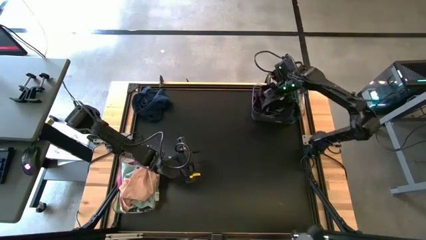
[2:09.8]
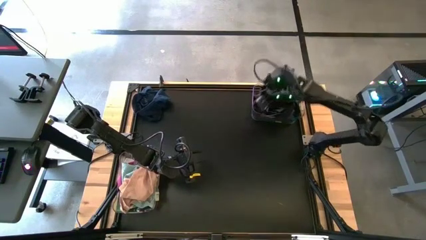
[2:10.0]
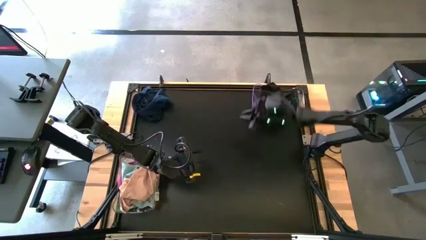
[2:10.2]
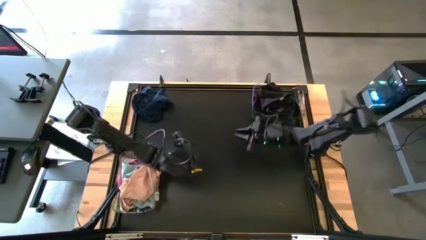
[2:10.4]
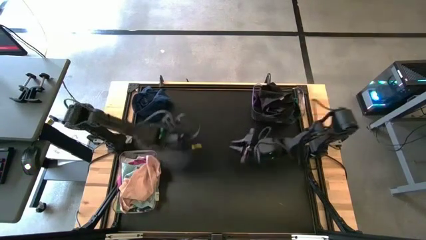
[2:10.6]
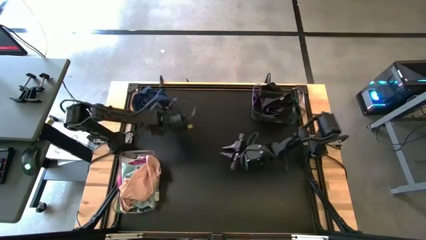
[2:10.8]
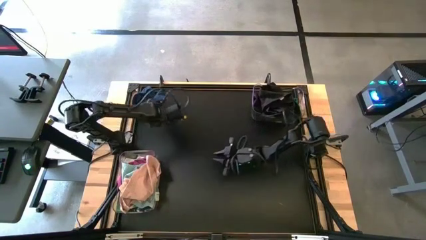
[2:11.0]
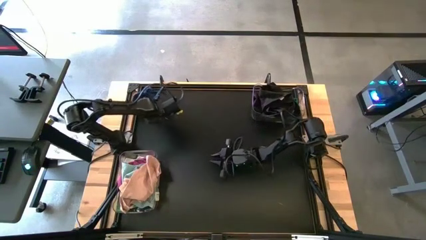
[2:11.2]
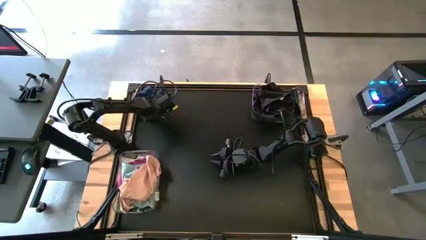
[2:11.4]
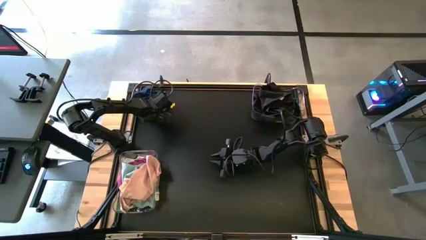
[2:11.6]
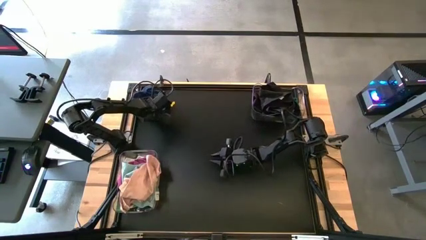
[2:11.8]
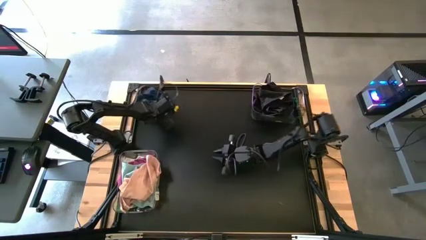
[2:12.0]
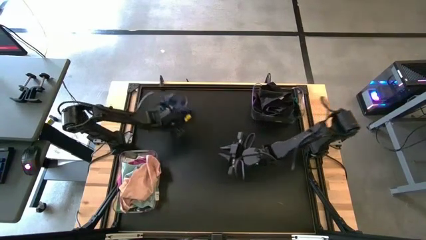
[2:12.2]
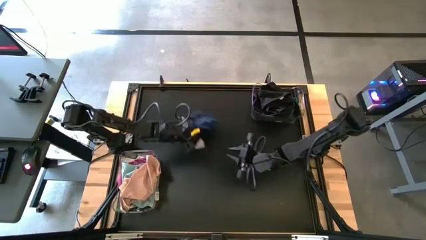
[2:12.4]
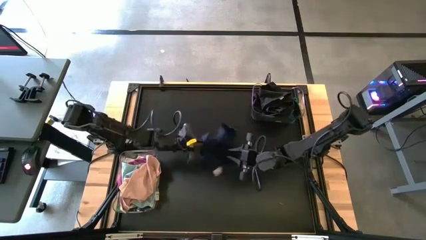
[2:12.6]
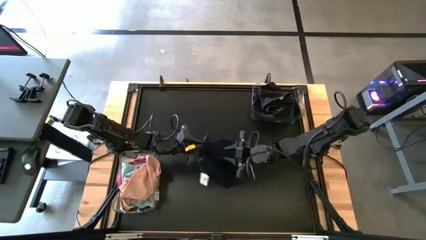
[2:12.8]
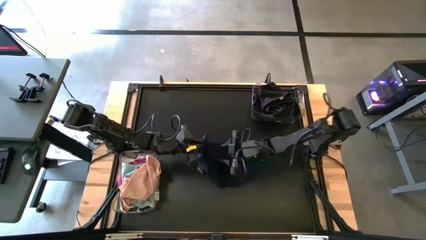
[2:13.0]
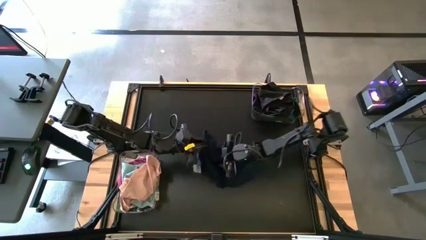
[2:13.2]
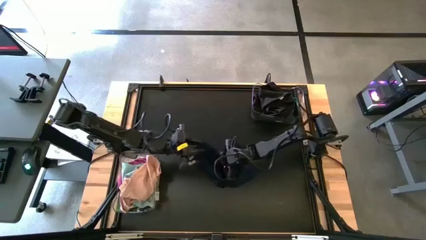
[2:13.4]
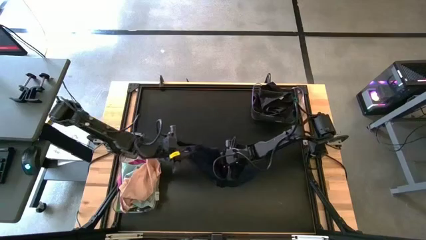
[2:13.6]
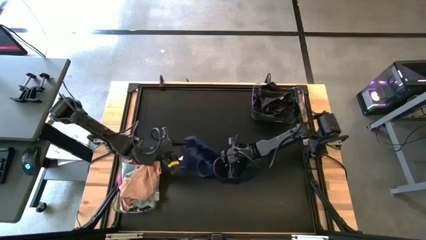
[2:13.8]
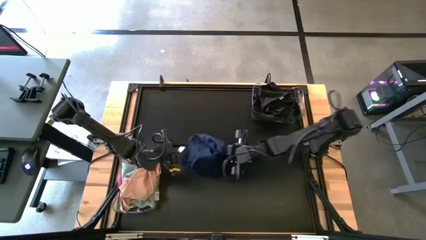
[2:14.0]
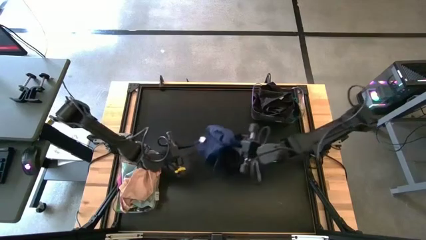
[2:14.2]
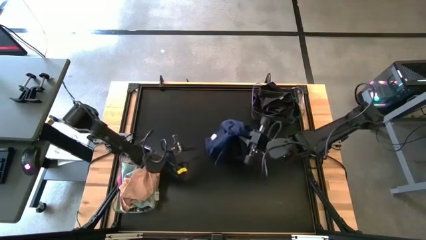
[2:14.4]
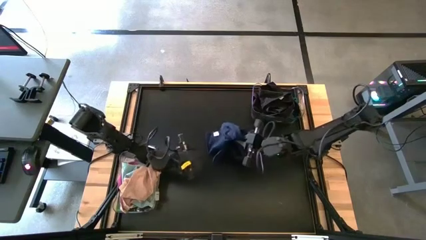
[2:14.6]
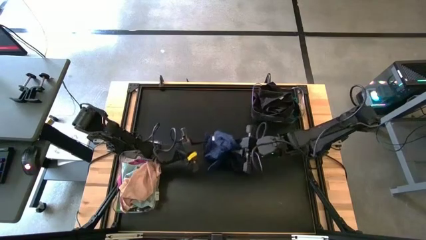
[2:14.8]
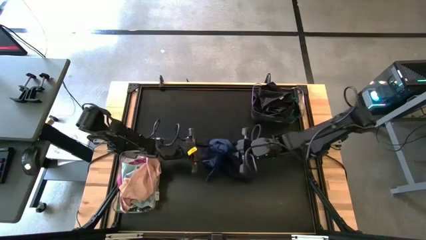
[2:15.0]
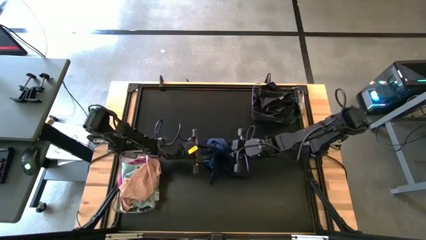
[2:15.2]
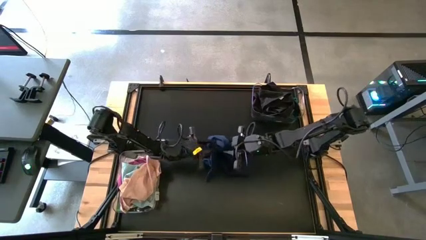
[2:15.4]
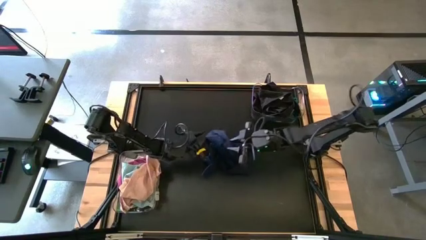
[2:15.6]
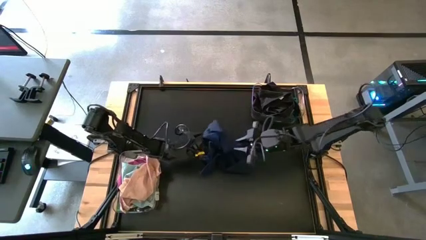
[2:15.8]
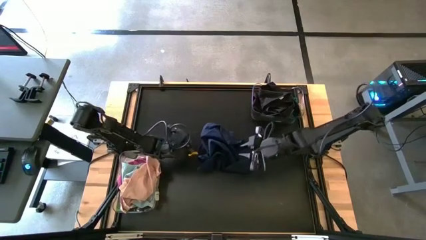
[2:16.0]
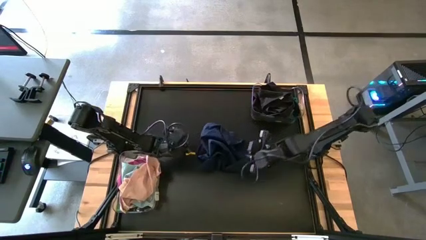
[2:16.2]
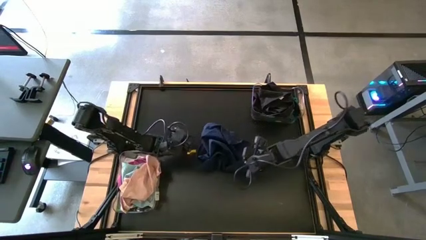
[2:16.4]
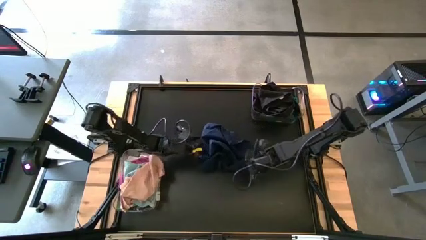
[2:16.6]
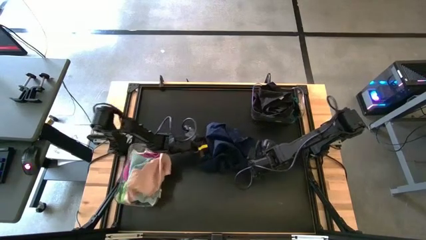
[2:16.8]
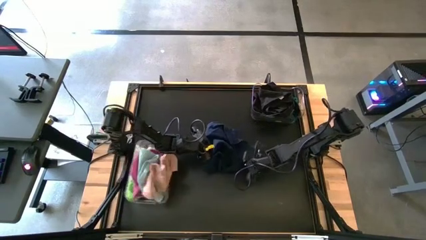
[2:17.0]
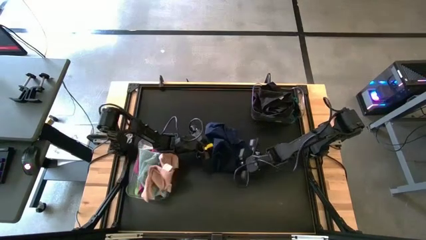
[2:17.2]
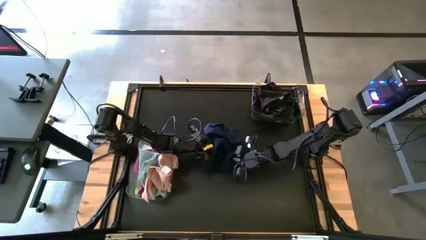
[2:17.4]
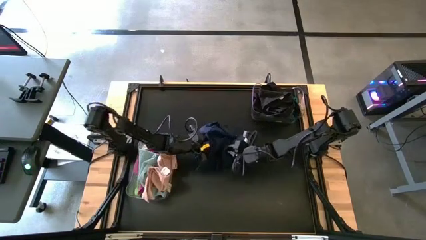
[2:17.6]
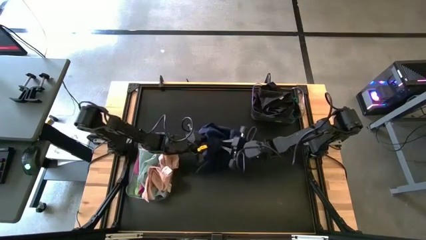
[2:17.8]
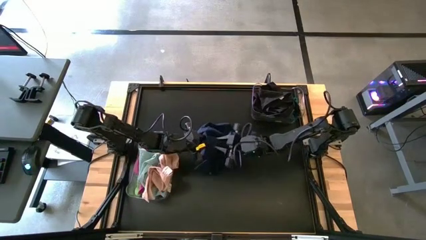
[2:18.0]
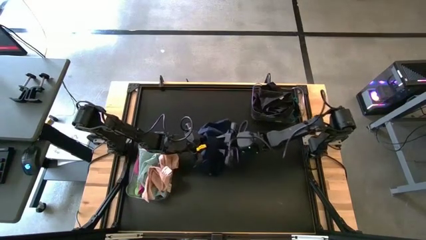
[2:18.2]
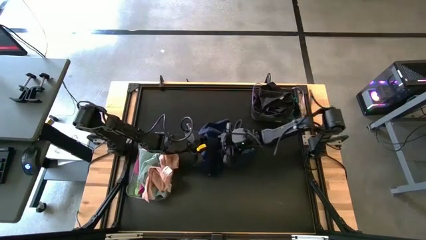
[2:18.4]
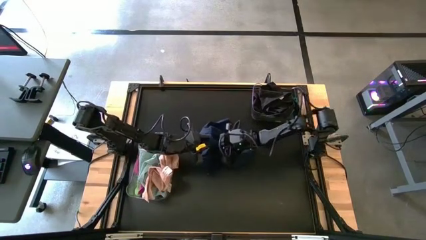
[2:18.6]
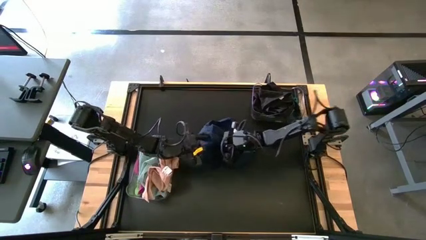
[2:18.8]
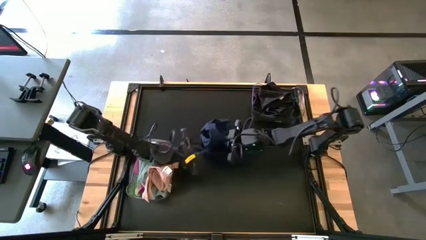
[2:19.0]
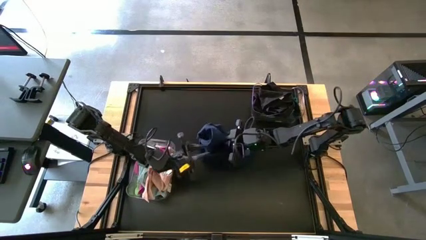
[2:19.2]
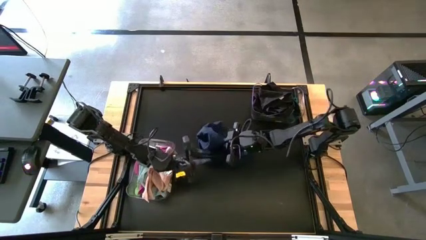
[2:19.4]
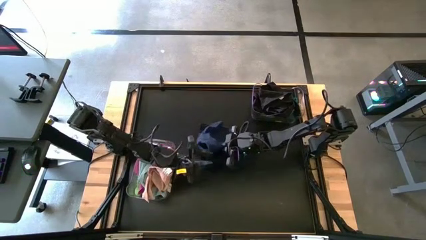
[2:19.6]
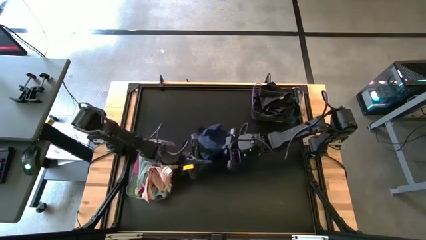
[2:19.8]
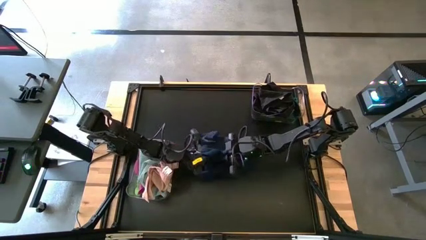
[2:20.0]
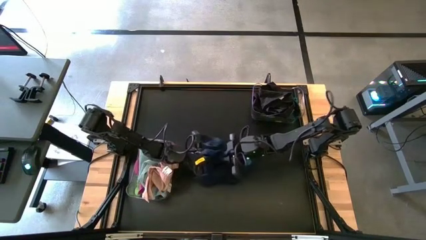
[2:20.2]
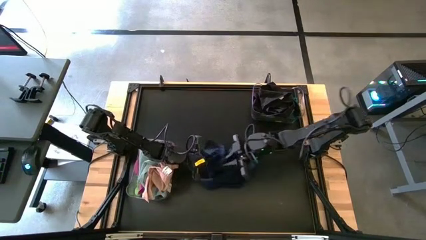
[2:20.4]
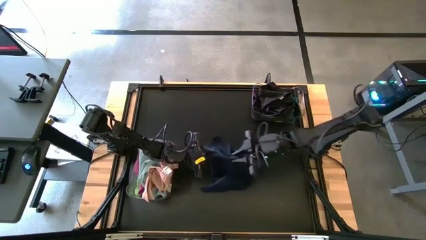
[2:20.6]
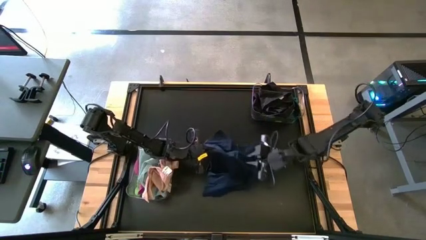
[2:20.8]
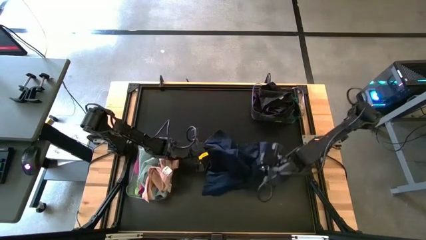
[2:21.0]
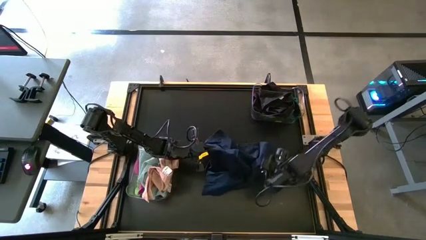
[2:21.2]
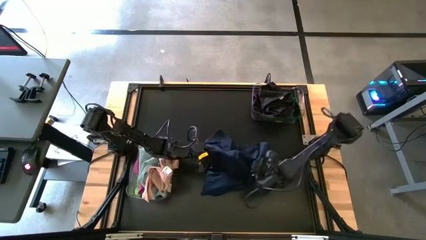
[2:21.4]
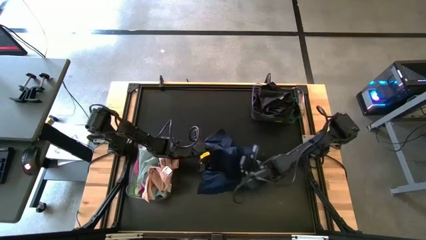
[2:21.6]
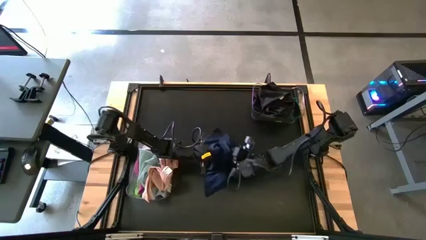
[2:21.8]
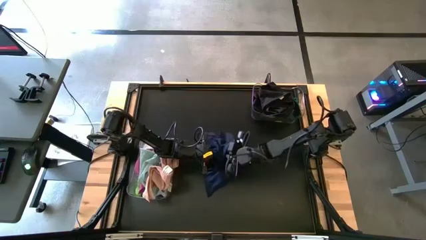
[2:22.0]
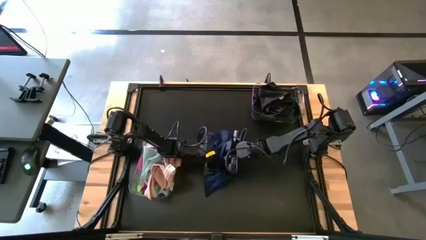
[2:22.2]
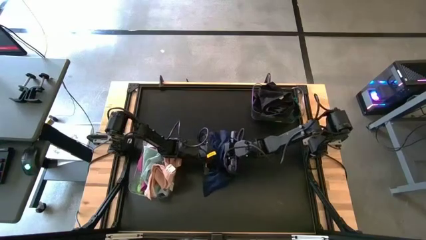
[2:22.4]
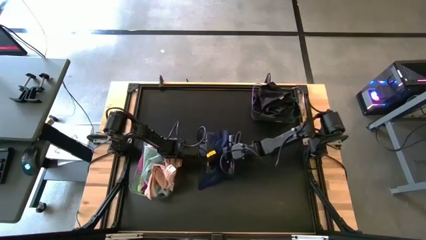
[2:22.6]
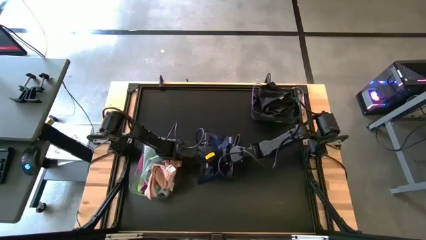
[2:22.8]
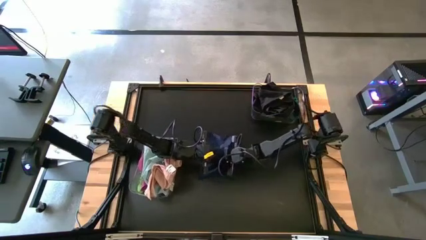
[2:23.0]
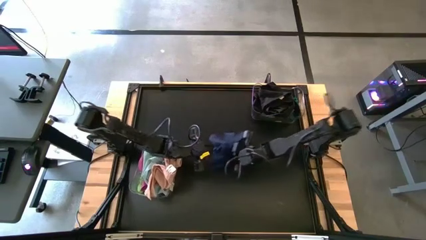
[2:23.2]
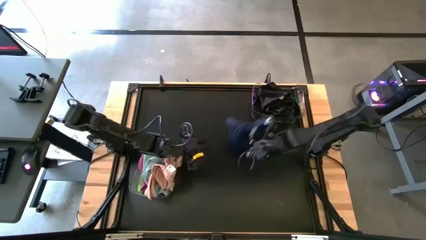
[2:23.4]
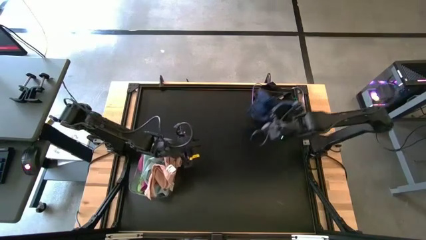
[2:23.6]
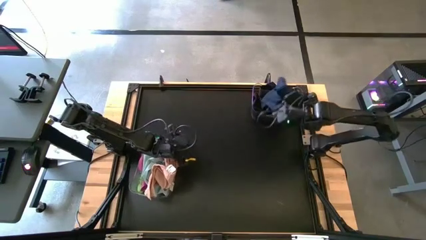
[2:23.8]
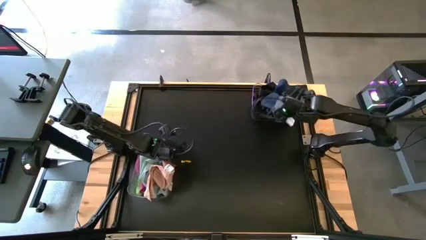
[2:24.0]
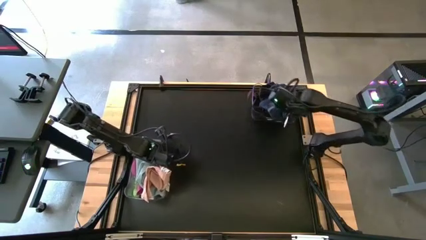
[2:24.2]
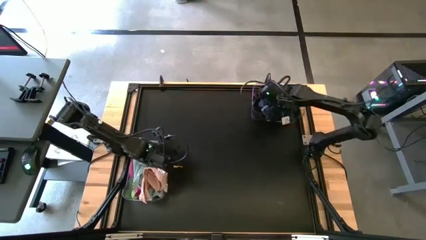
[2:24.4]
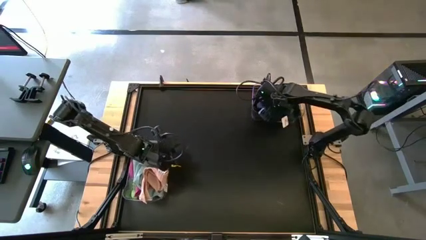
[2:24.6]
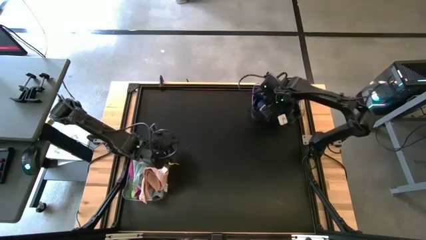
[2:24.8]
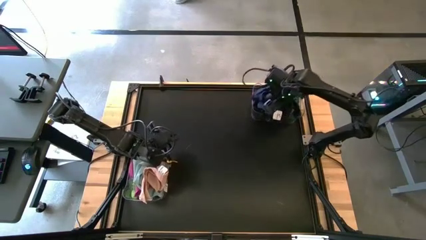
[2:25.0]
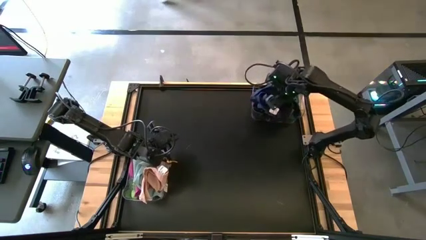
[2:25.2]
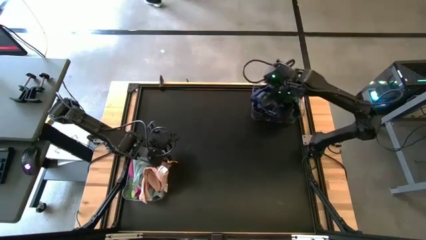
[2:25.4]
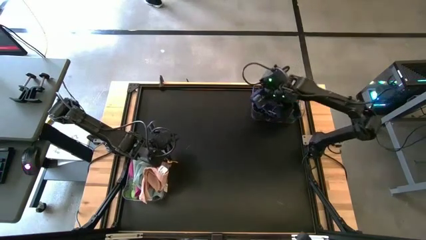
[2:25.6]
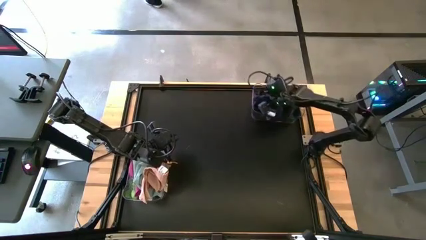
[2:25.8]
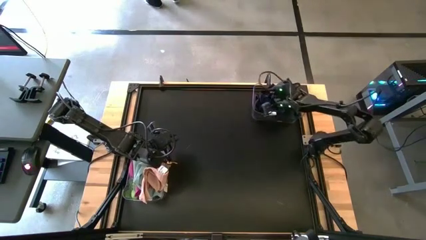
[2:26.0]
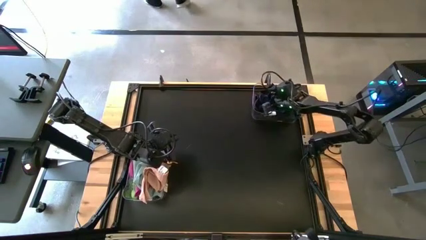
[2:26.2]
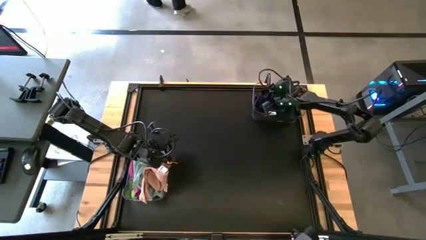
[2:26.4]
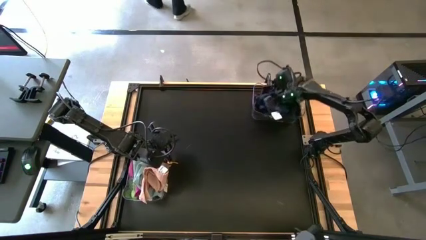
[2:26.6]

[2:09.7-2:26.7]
Task: Sort towels by color in basket
Put the blue towel into the top transparent bin
